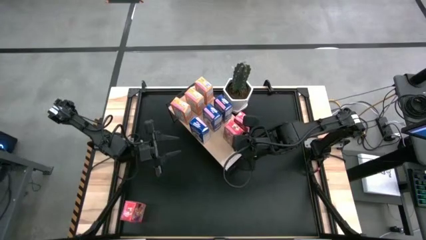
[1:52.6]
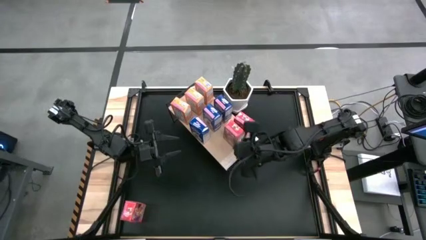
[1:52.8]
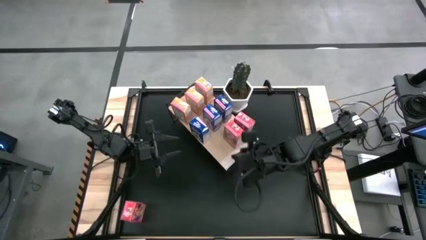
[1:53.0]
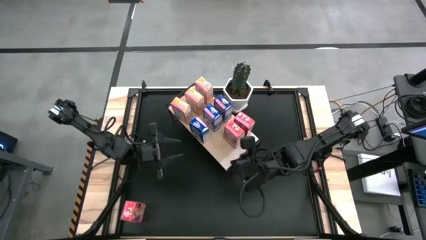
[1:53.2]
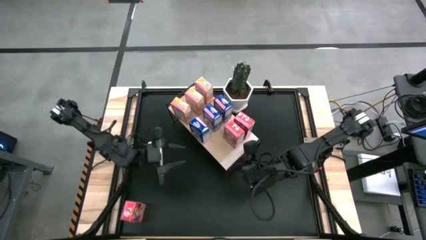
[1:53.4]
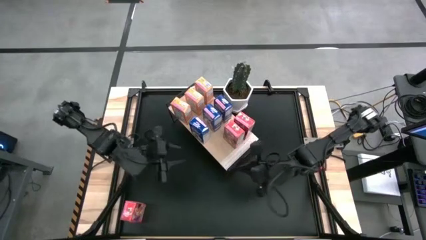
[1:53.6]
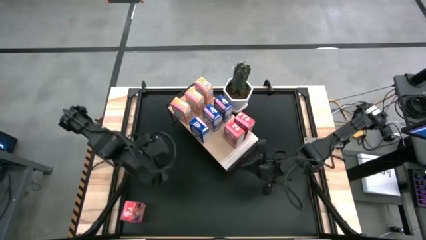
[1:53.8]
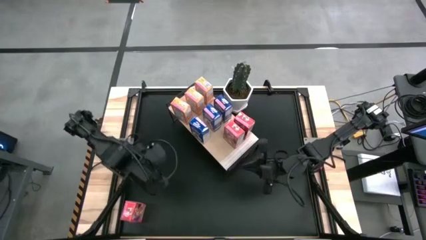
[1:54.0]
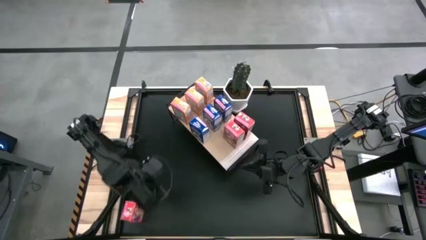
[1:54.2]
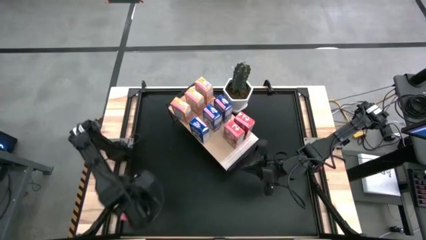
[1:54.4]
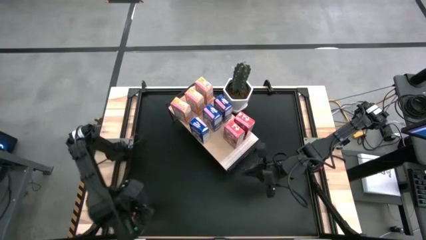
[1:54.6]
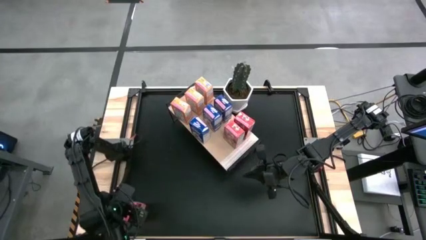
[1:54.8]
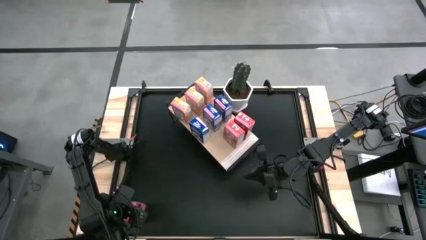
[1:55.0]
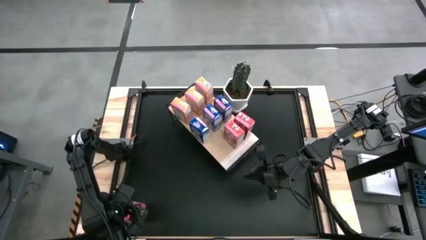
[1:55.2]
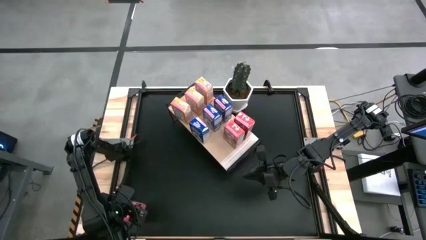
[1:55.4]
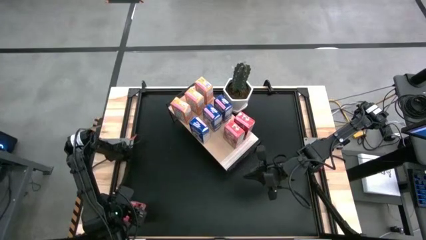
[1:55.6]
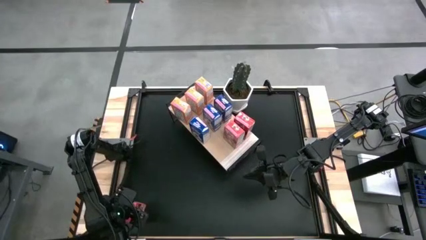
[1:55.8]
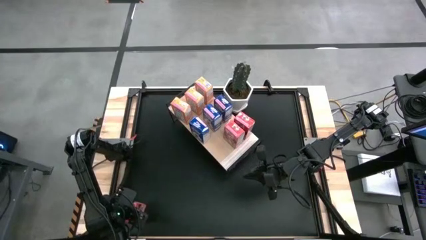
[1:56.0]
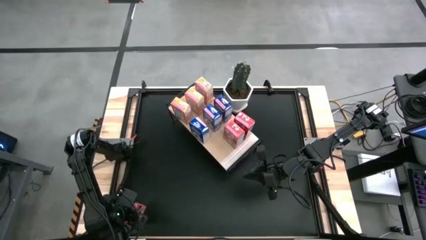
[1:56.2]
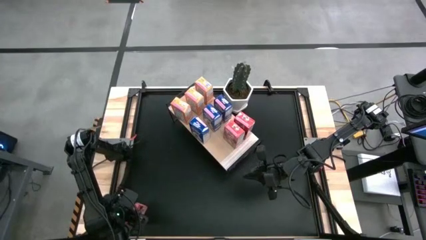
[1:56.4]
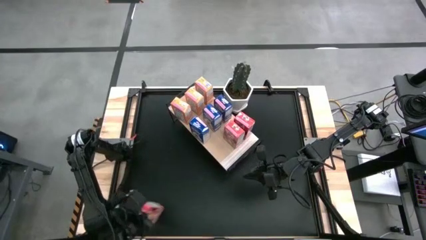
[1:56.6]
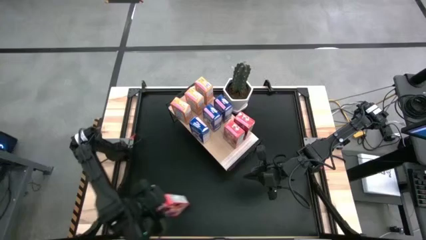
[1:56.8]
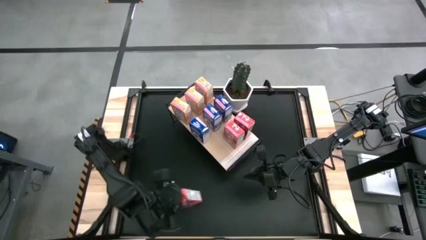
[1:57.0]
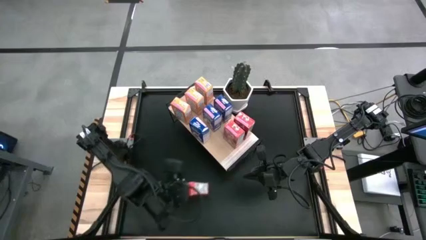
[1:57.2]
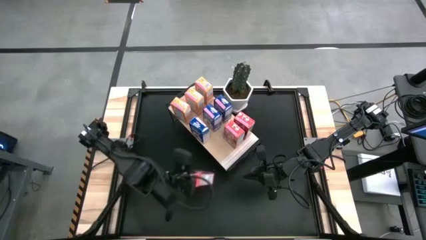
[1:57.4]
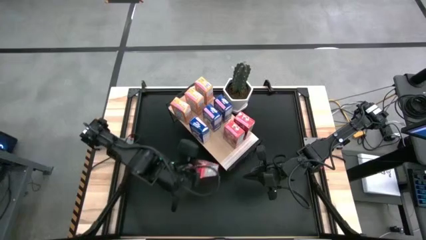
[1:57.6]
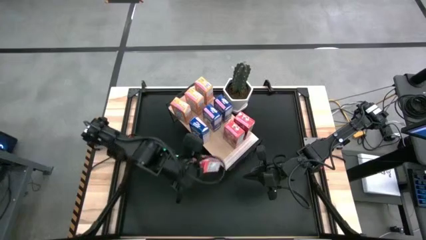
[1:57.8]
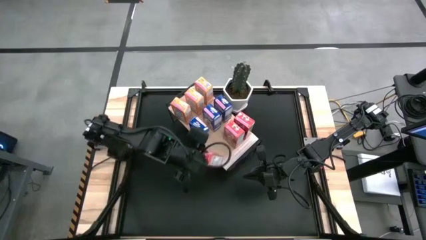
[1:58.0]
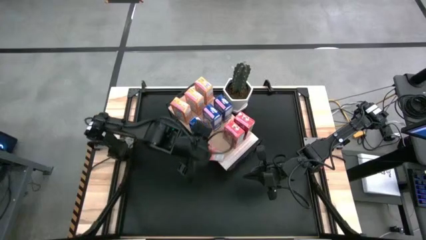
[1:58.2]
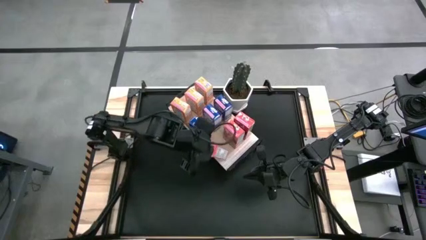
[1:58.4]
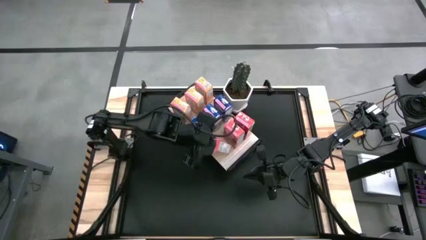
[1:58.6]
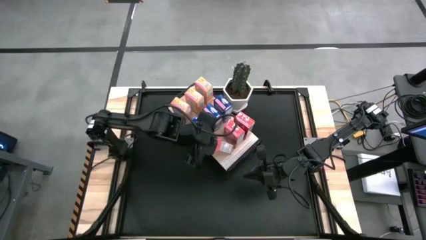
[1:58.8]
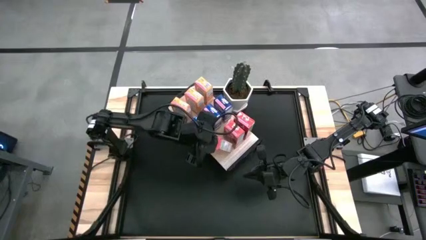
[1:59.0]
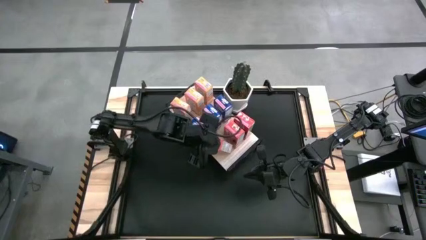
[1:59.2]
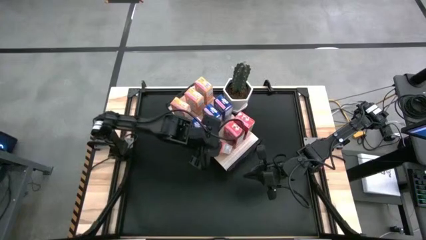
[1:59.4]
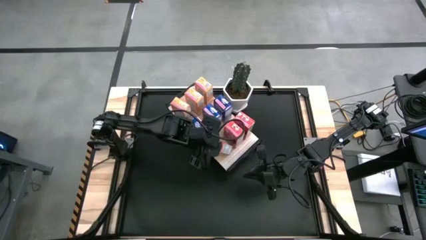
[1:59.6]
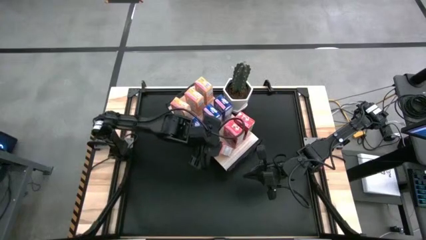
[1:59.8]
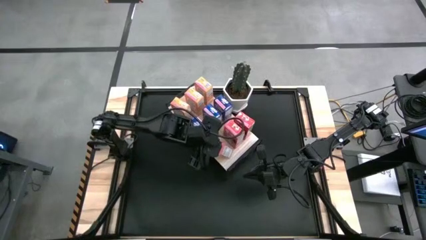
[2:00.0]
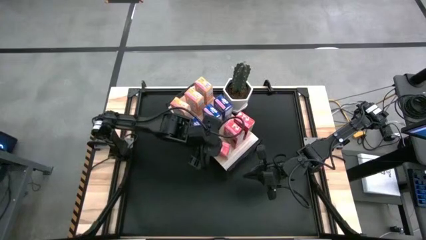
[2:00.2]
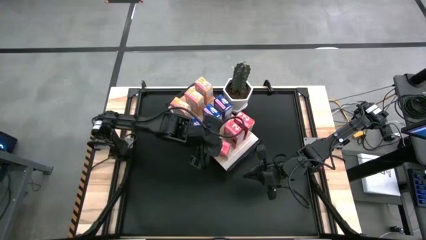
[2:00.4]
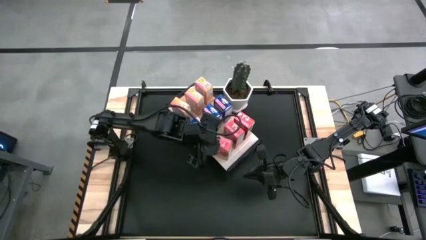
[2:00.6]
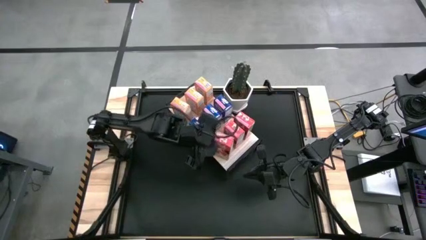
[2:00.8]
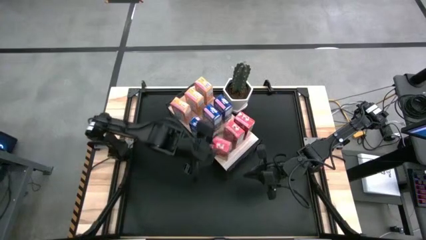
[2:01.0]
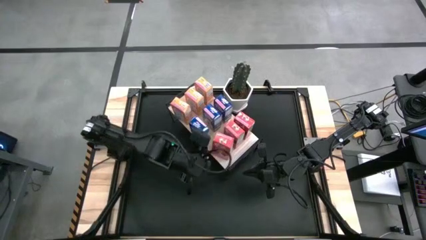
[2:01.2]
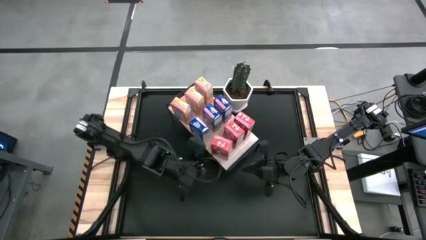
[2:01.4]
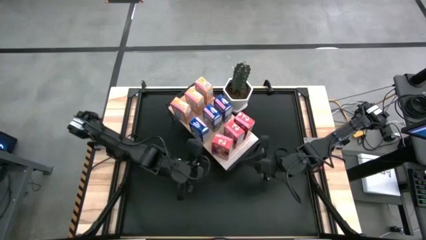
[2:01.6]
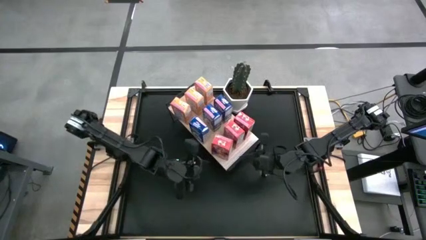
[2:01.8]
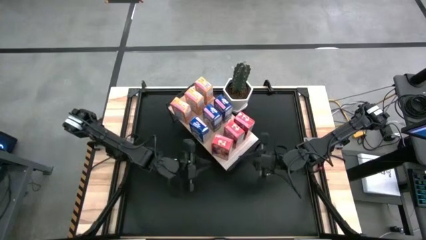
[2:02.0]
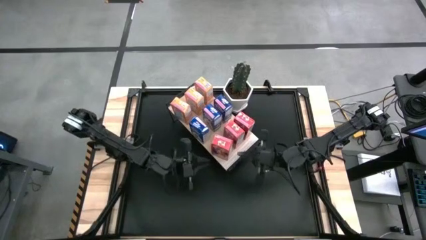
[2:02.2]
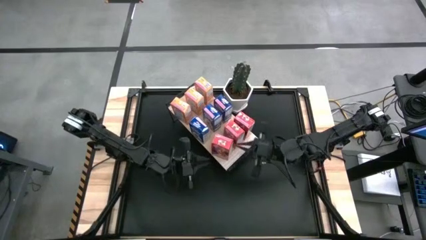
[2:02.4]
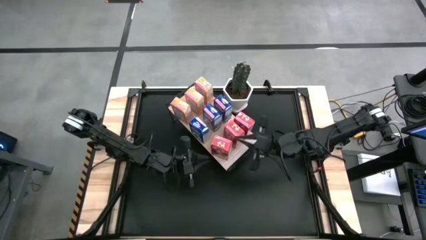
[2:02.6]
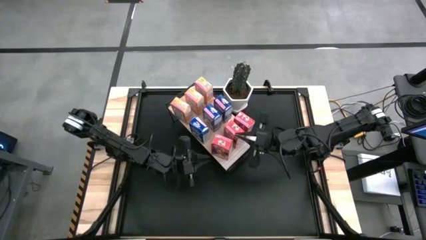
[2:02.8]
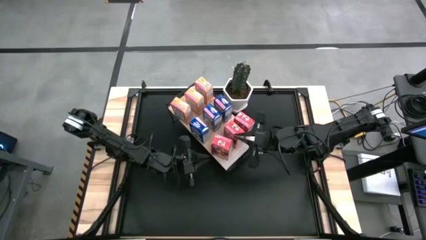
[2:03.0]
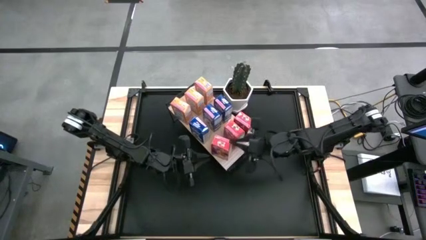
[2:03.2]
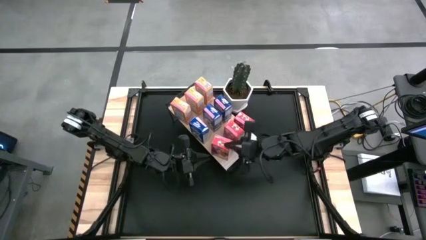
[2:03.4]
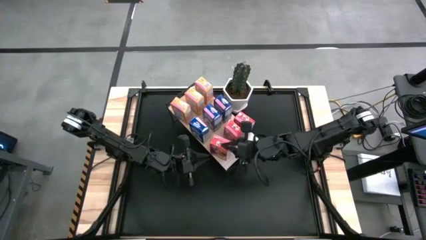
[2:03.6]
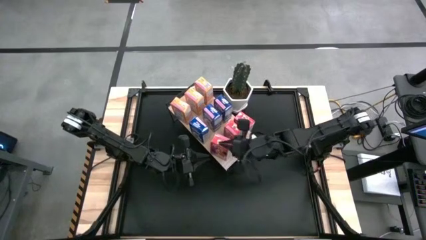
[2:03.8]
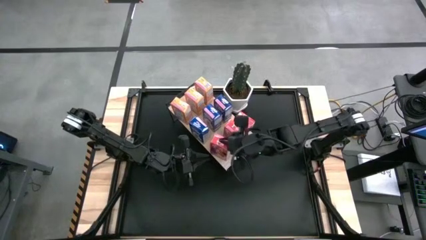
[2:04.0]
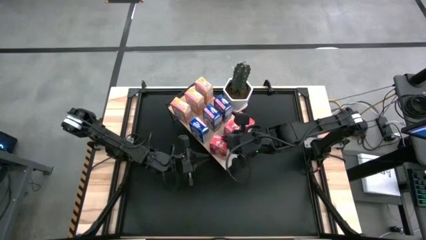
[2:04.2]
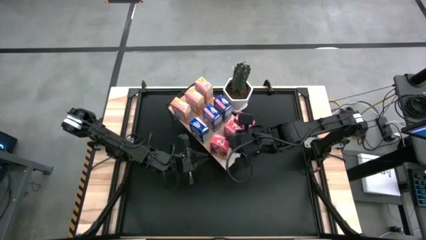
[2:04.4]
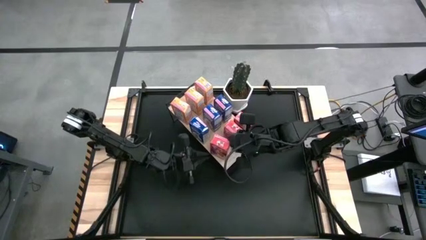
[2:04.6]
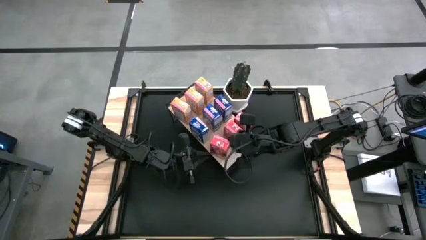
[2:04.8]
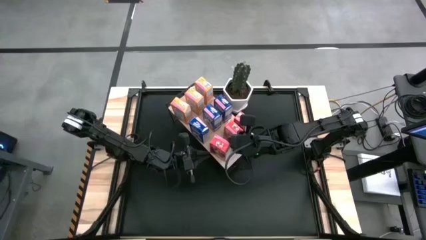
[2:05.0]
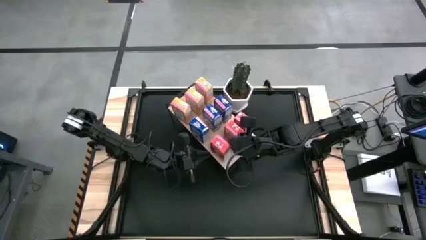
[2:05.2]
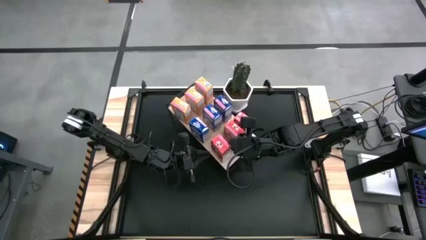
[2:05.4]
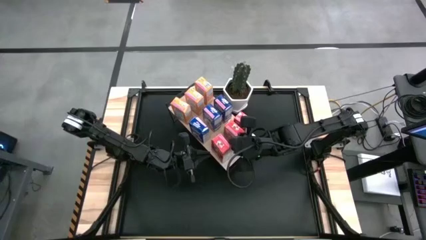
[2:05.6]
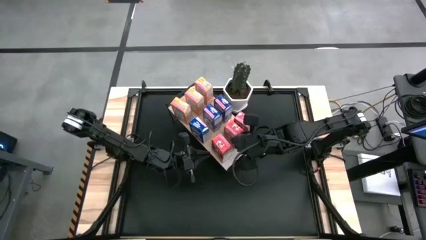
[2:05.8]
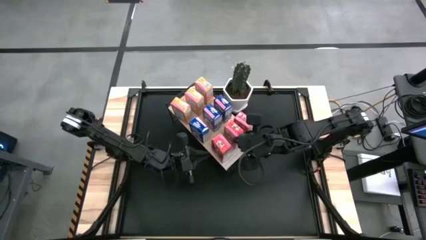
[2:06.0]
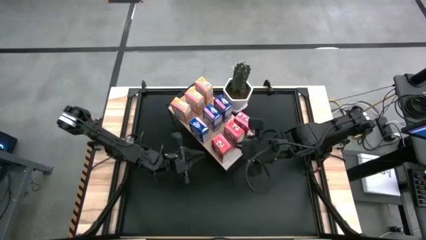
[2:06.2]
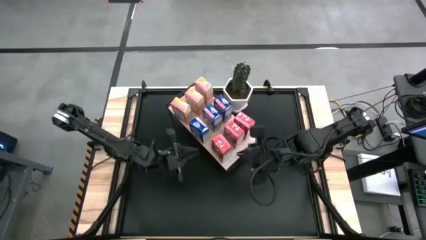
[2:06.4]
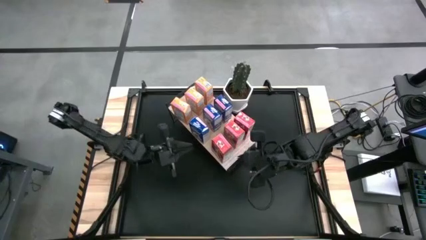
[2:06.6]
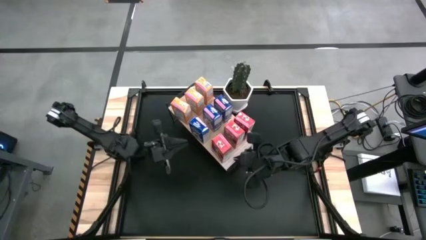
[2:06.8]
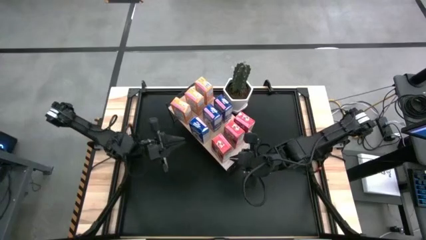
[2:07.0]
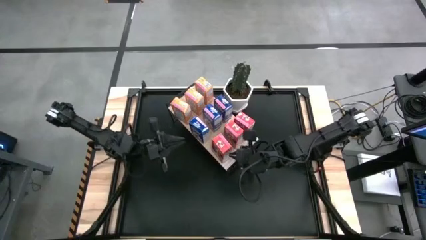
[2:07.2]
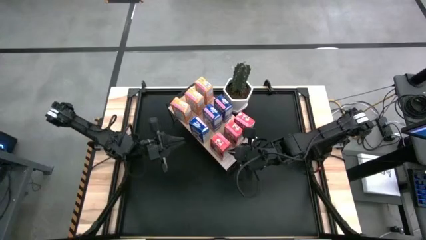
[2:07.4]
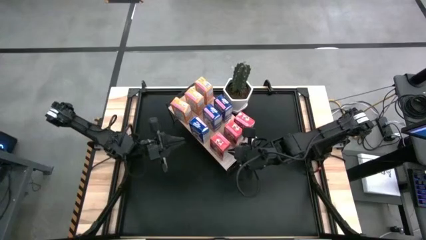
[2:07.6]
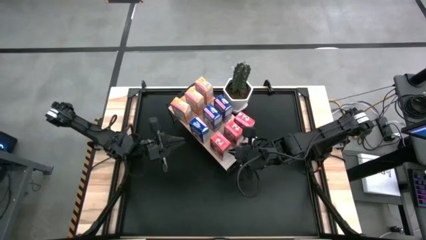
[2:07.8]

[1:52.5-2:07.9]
Task: Stack cereal on shelf
Put the red cereal box on the shelf aligned with the other red cereal boxes

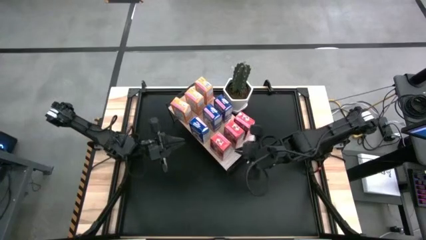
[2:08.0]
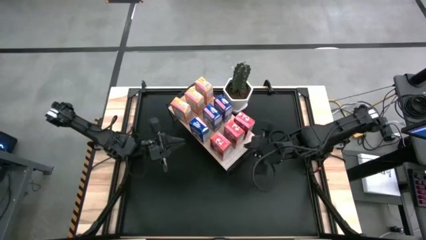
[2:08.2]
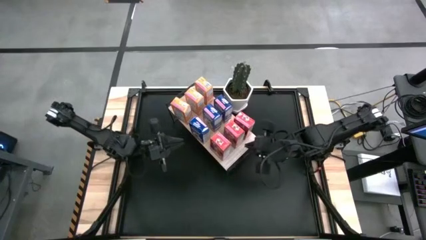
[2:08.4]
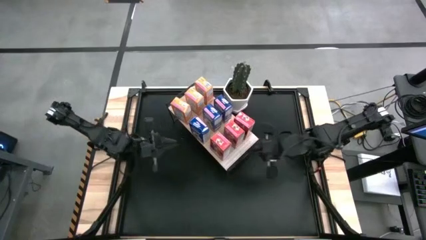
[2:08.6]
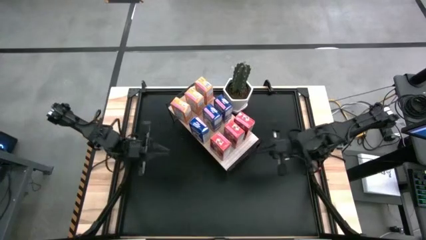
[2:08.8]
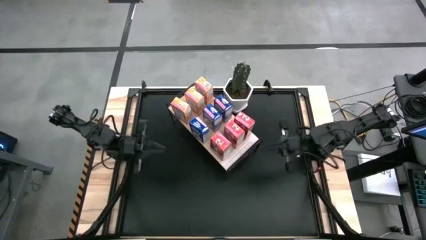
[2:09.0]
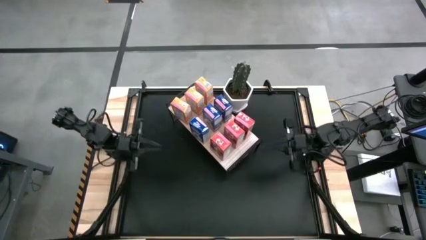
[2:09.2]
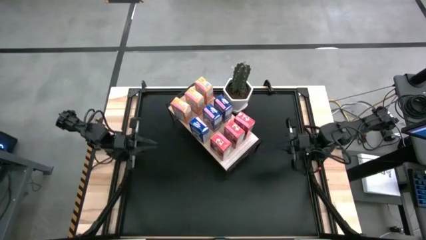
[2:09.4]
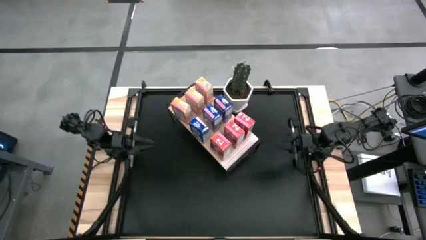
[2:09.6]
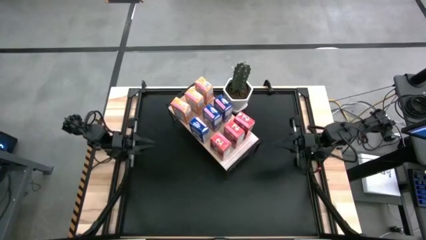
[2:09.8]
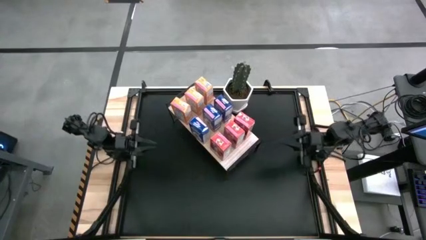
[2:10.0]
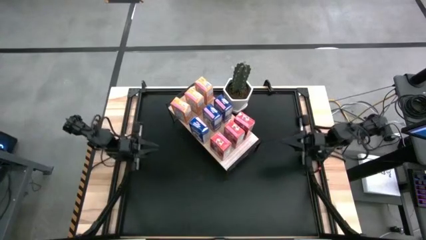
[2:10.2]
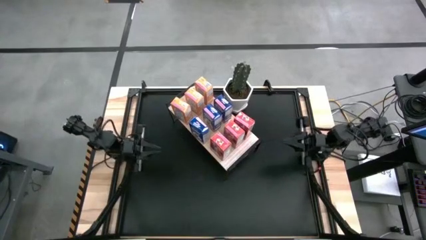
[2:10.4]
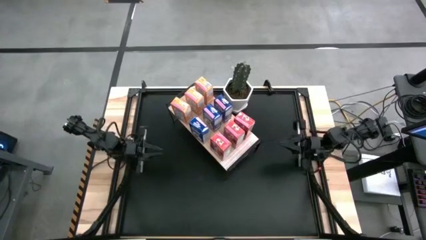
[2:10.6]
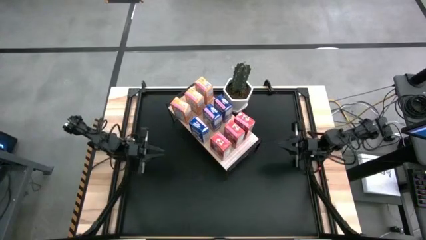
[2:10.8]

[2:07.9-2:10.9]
Return to Home Position
